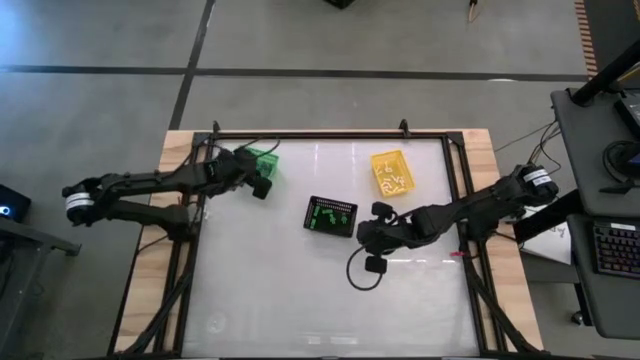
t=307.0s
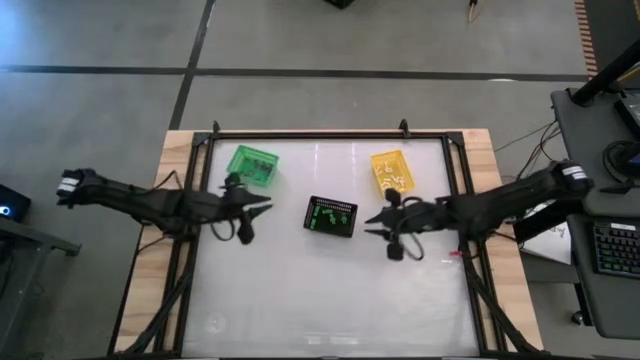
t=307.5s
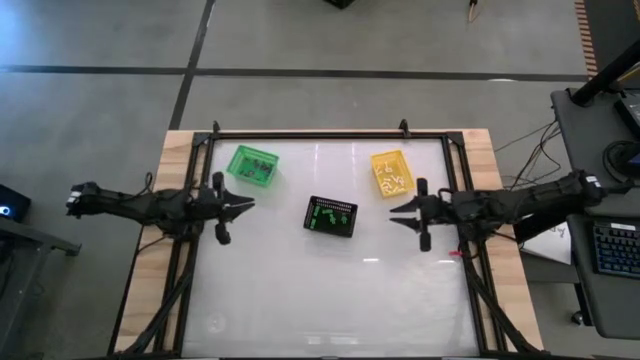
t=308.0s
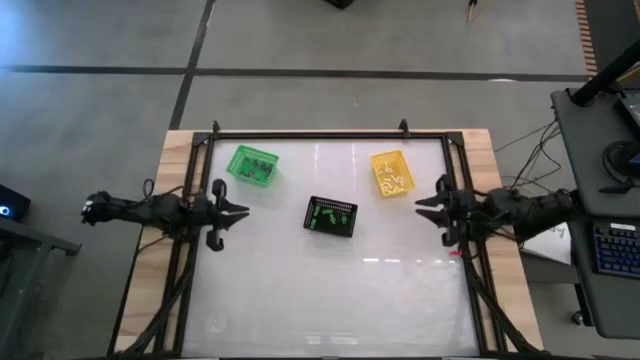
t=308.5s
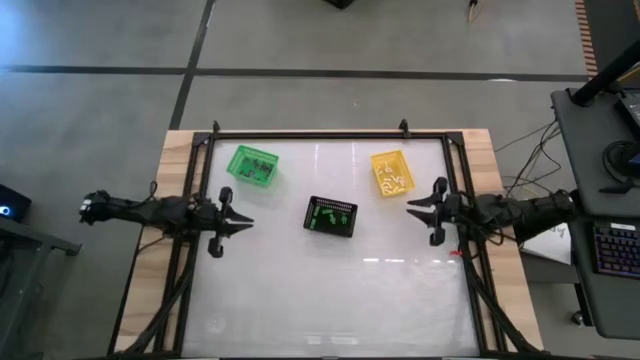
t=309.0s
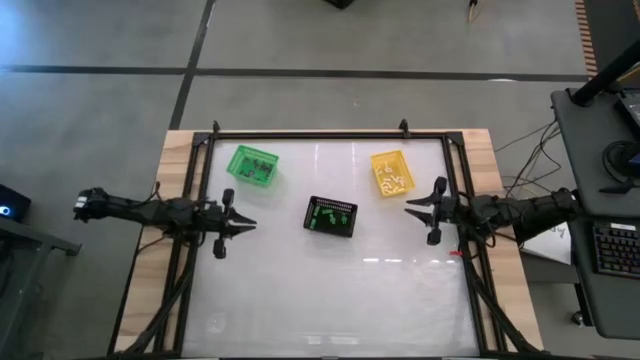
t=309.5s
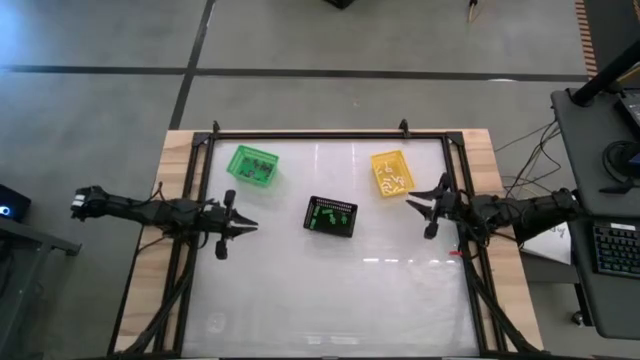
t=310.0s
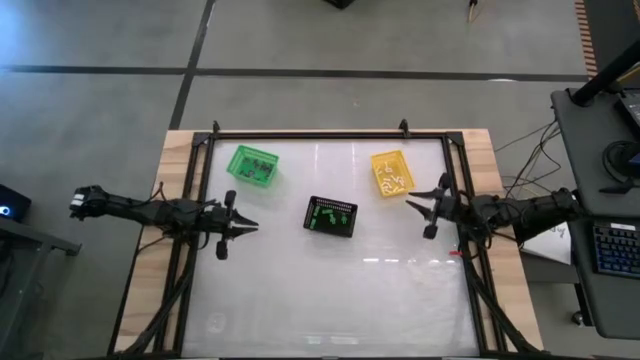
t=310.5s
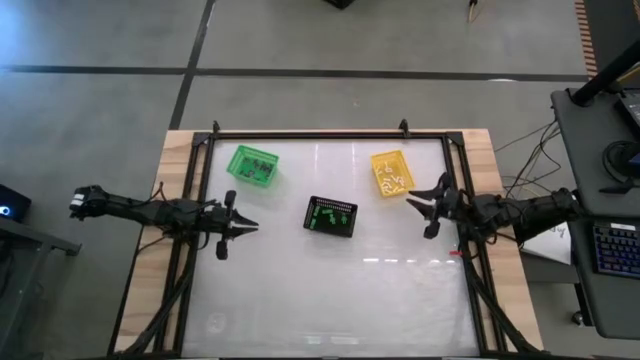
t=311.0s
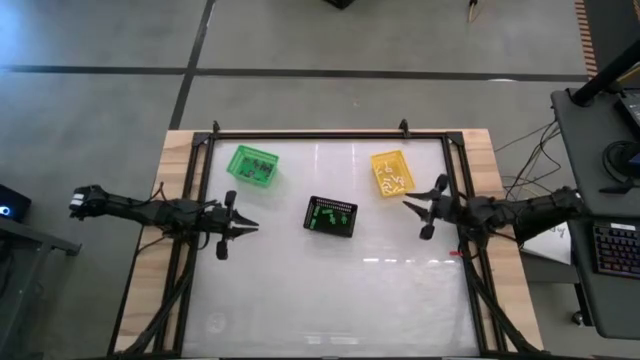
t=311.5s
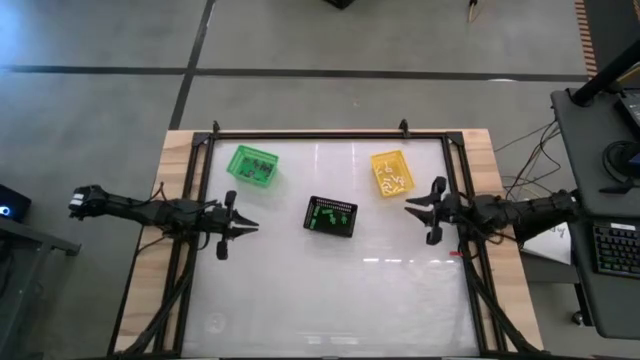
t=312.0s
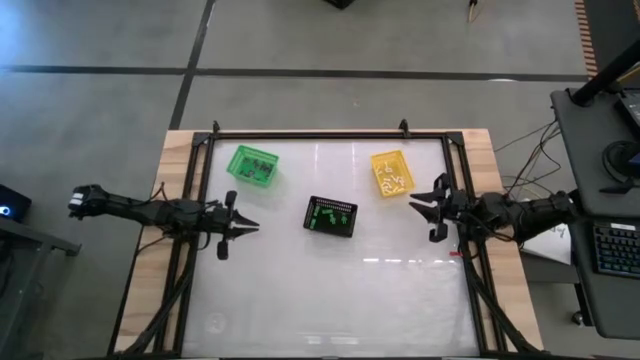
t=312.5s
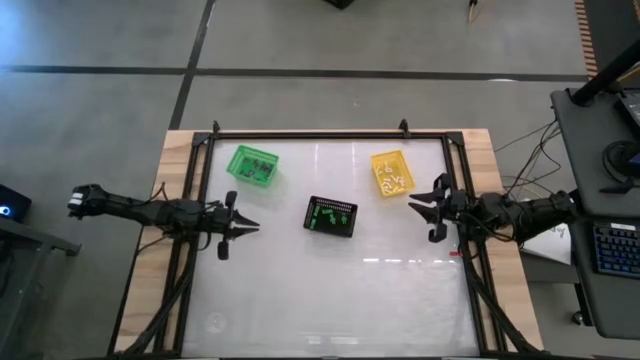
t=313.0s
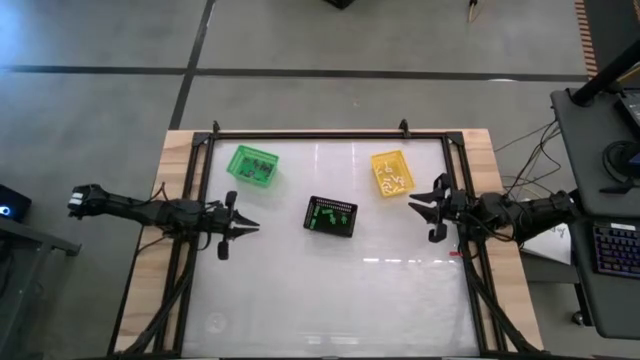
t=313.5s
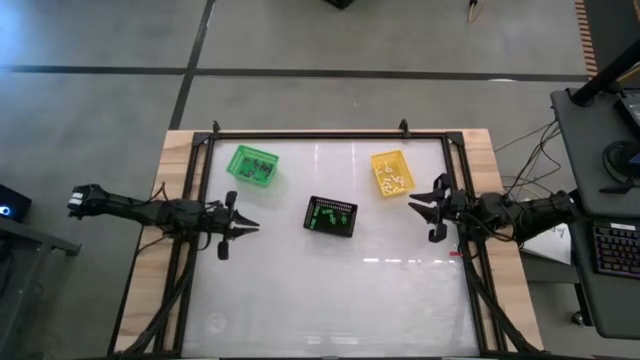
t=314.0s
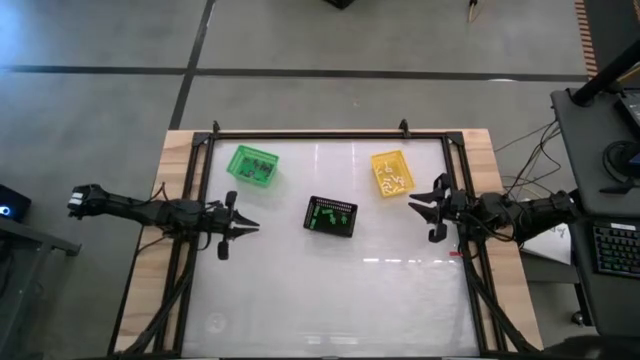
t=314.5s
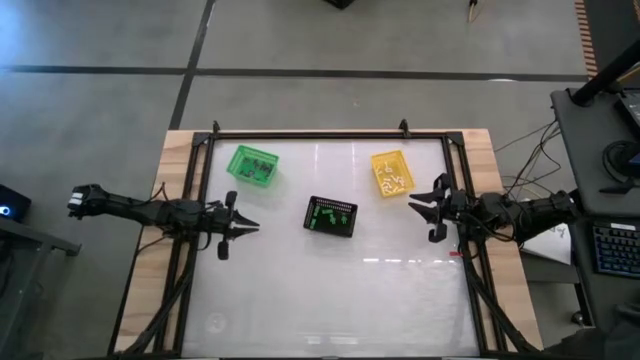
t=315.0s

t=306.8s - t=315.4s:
Task: Sort Halloween decoration
Return to Home Position

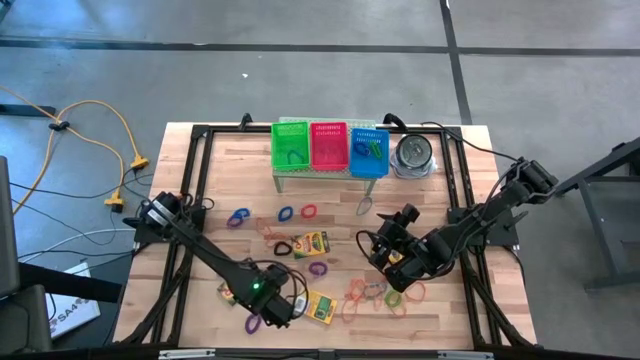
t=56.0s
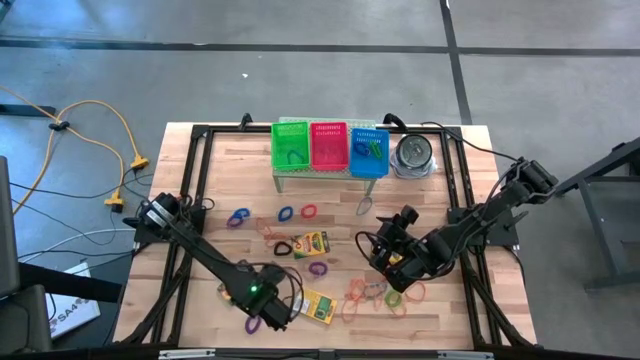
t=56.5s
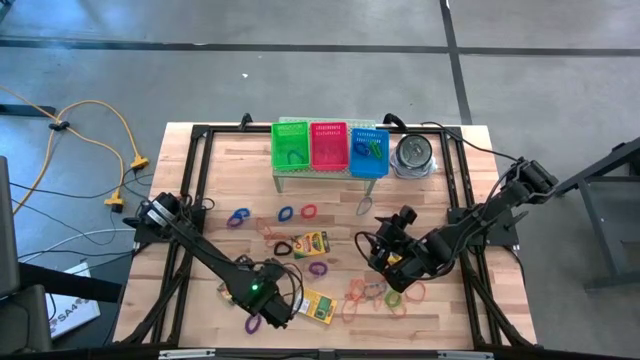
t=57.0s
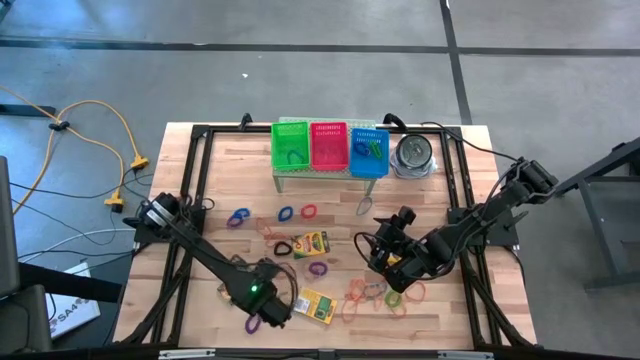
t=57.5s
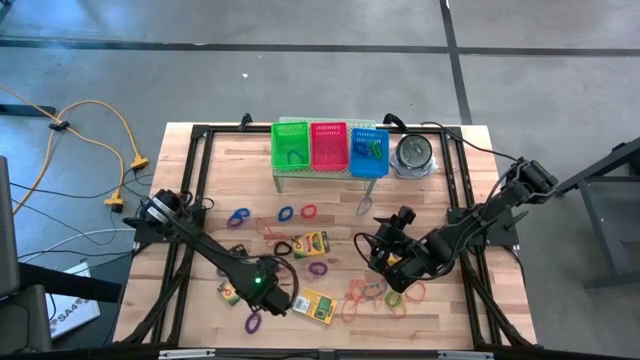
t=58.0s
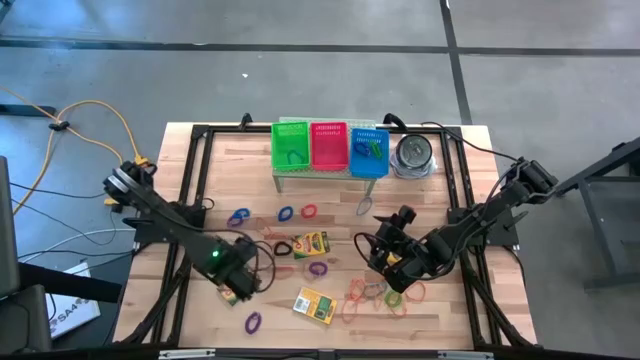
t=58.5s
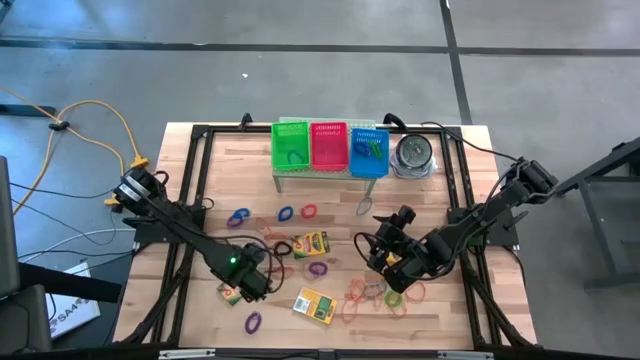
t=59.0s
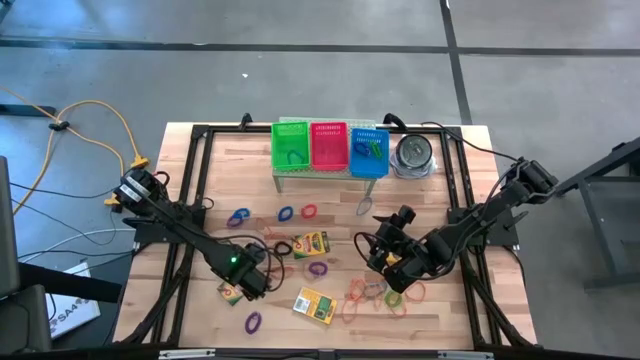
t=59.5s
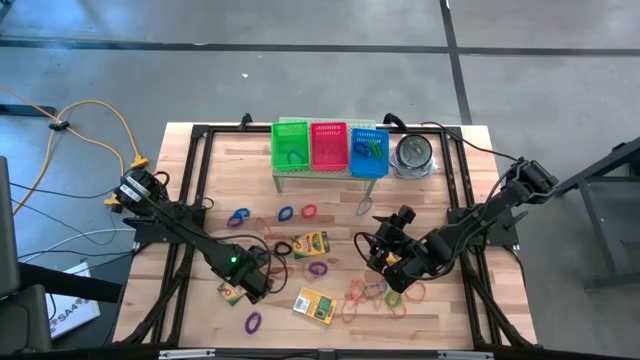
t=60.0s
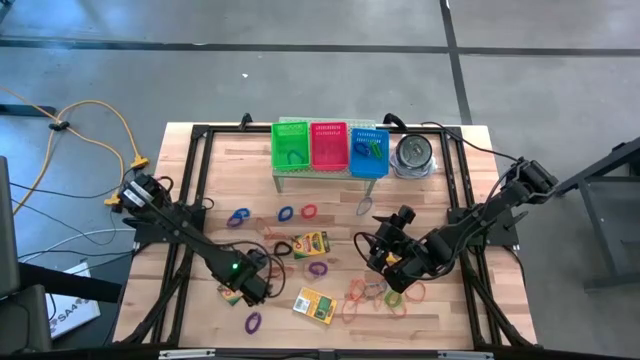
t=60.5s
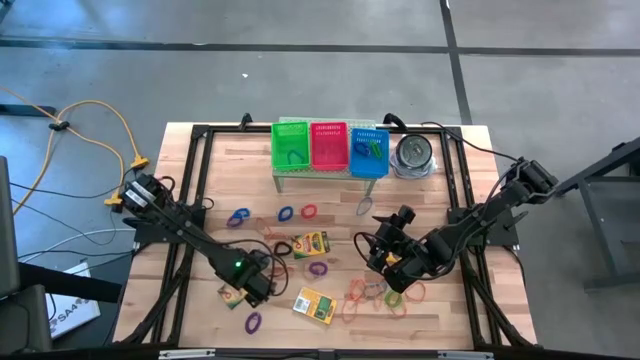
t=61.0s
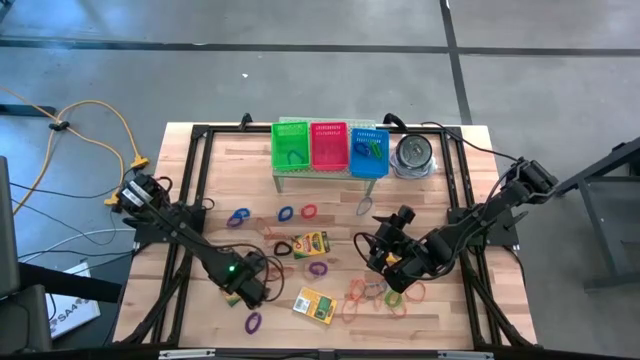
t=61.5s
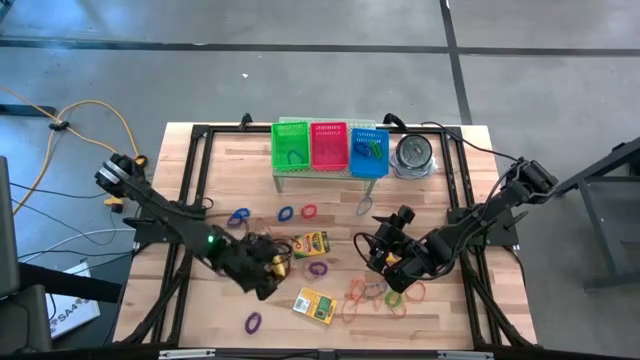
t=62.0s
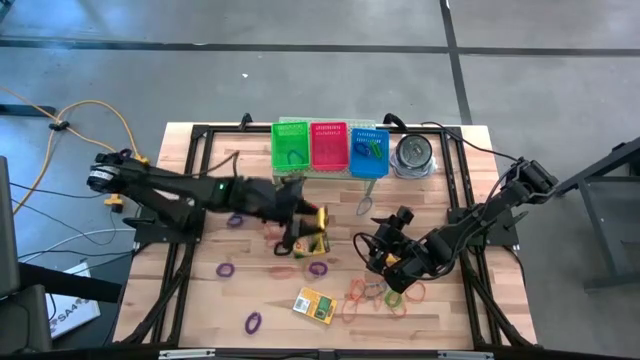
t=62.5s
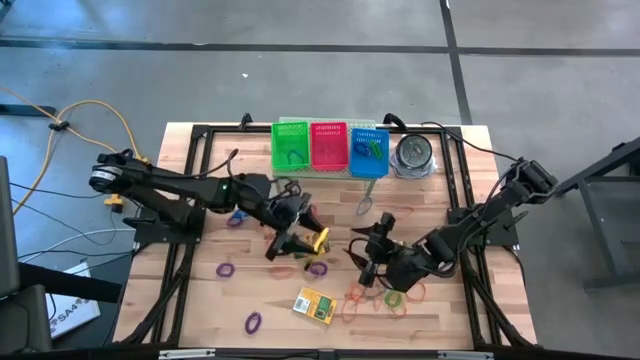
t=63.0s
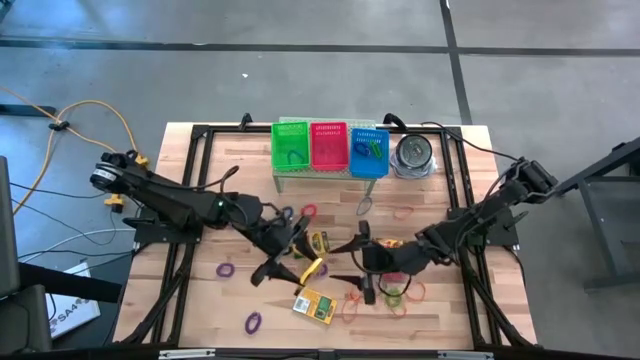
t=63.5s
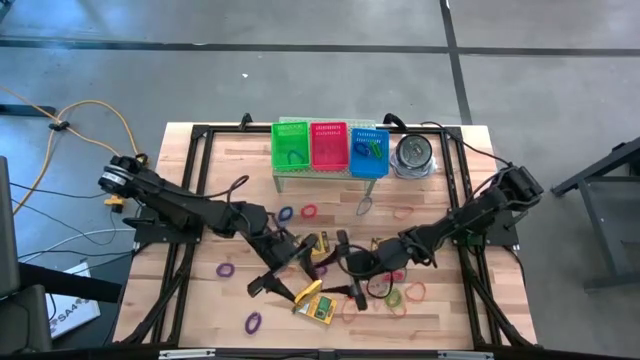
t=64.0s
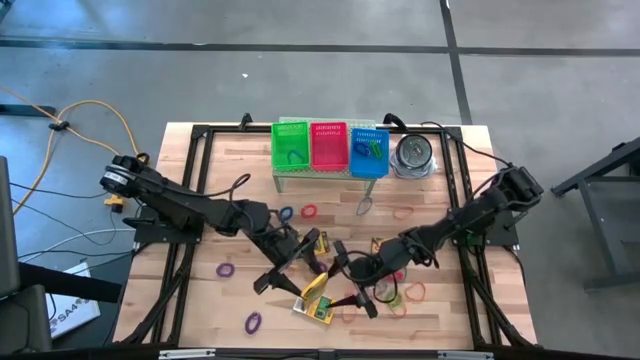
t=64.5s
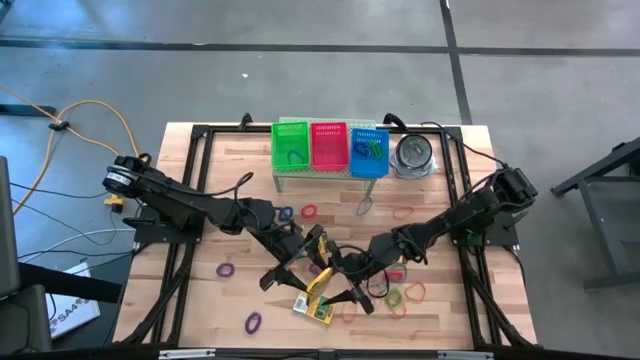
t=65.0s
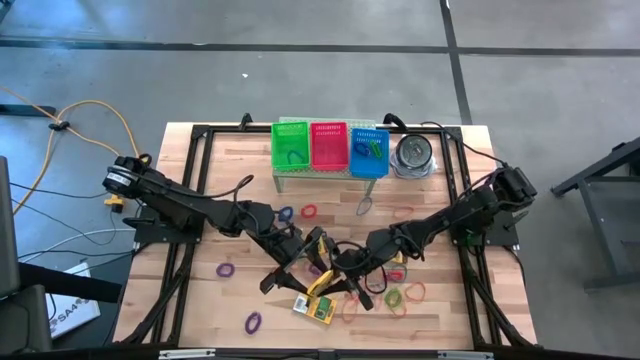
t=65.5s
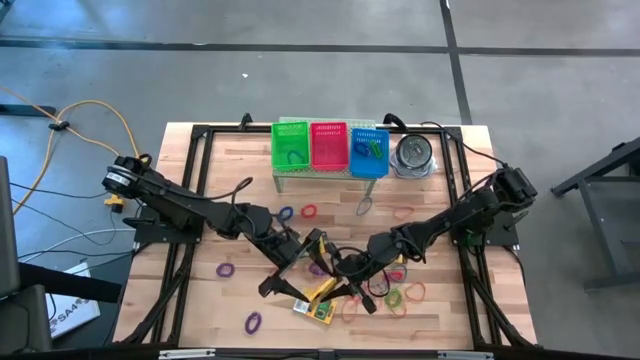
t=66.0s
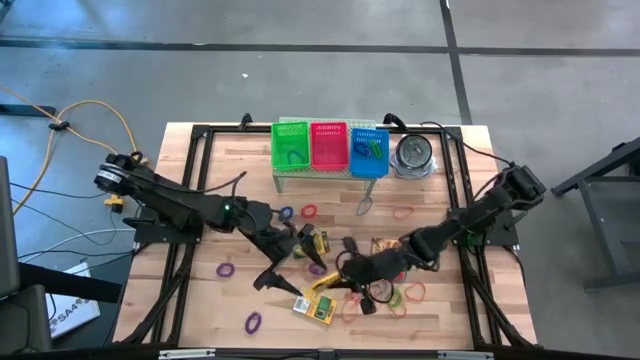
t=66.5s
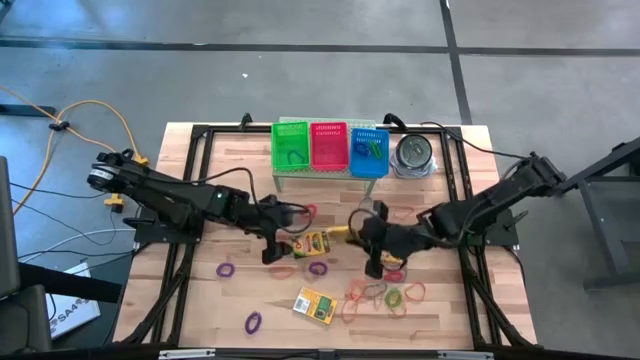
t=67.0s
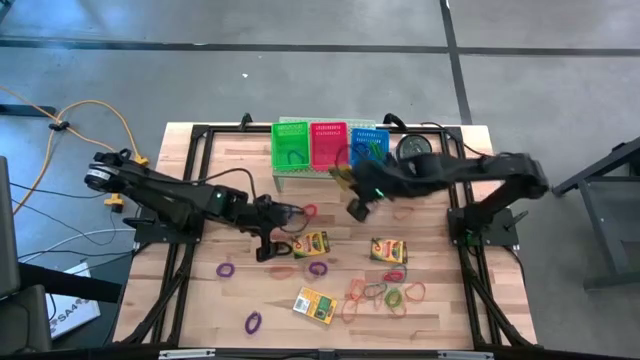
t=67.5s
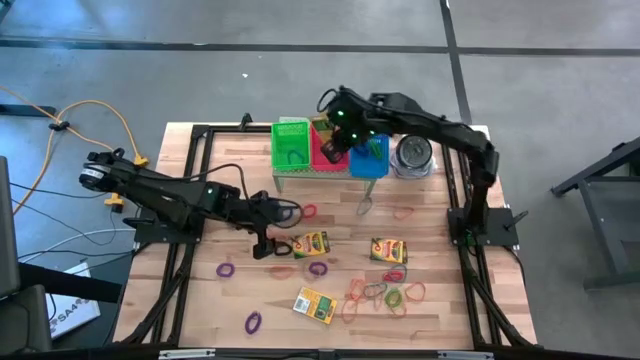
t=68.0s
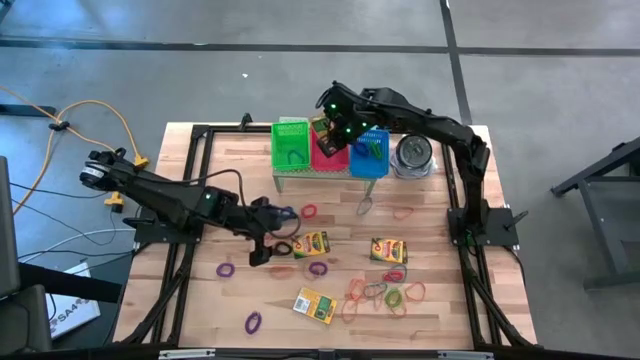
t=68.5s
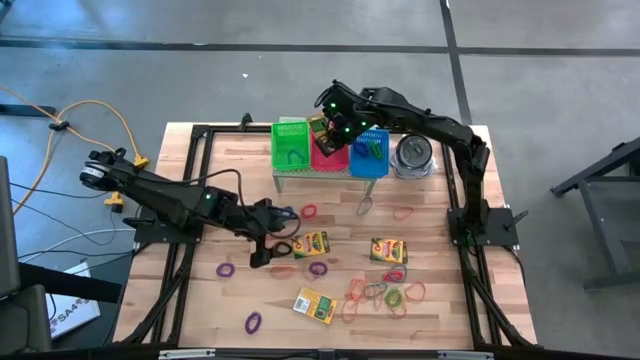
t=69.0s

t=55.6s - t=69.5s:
Task: Pick & Place Office Desk Supplies
Put the yellow crayon box into the red bin on the shelf
